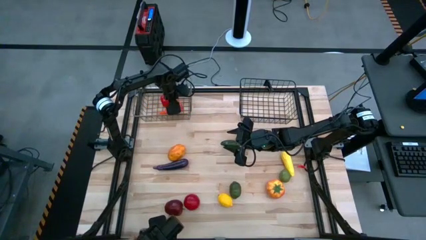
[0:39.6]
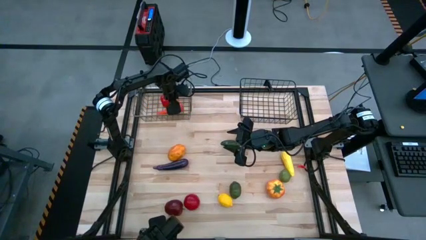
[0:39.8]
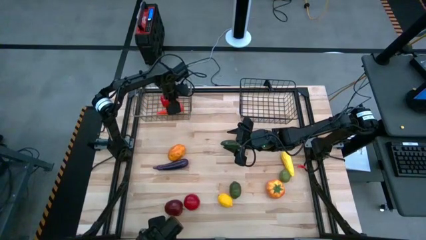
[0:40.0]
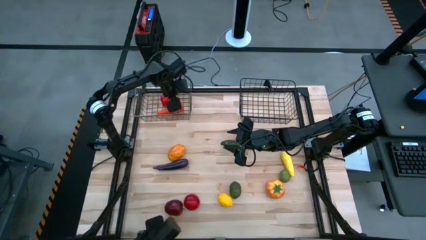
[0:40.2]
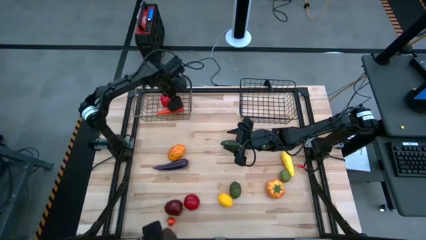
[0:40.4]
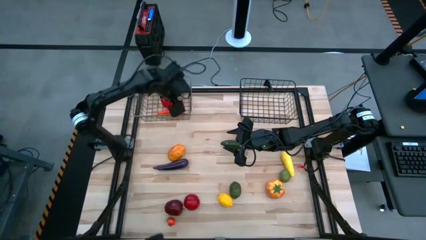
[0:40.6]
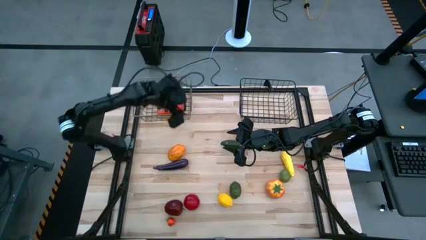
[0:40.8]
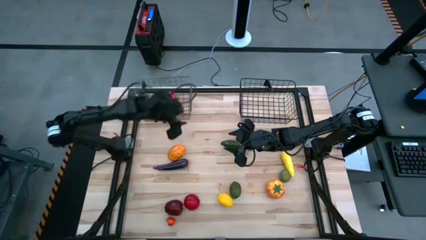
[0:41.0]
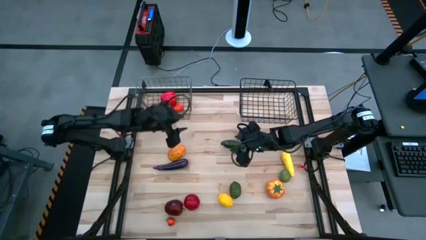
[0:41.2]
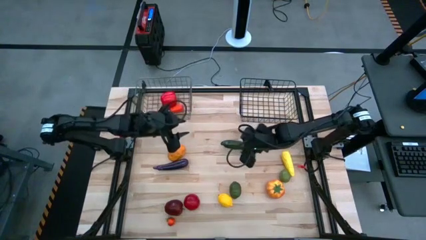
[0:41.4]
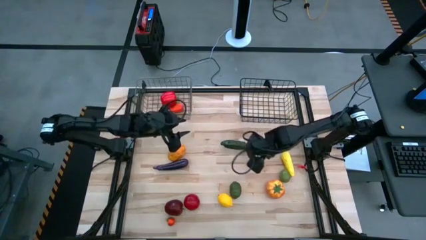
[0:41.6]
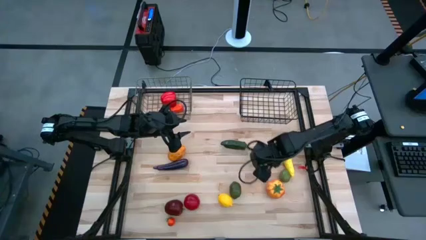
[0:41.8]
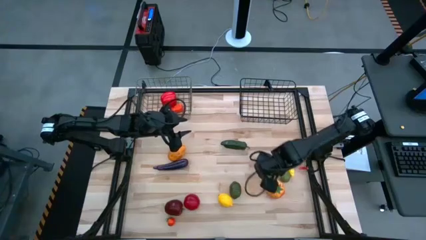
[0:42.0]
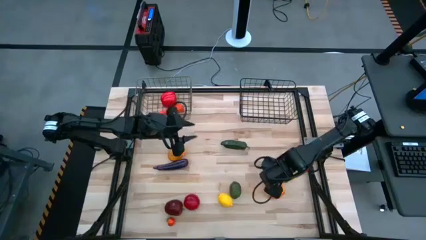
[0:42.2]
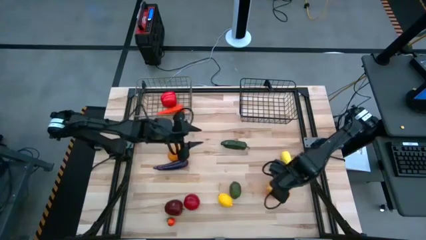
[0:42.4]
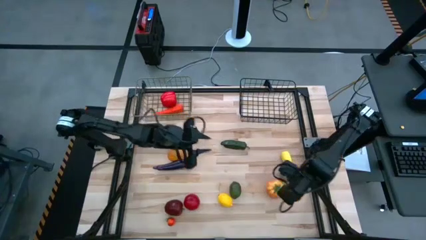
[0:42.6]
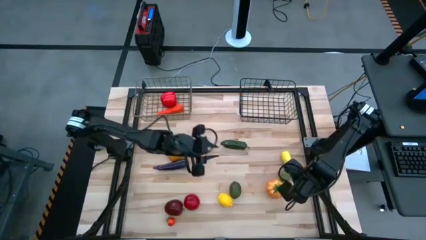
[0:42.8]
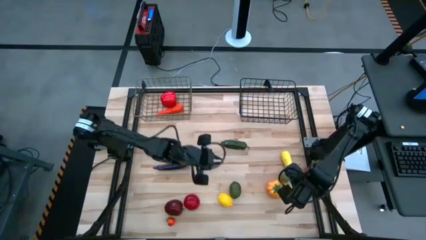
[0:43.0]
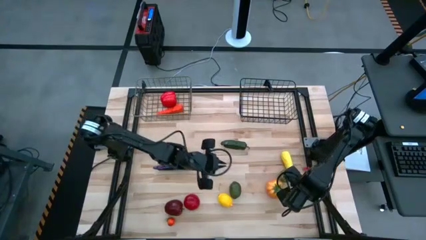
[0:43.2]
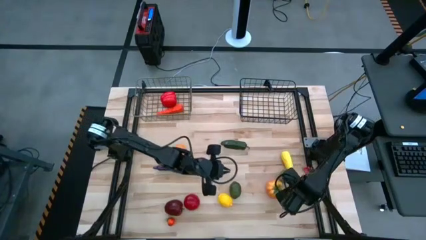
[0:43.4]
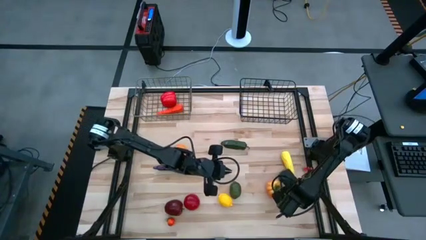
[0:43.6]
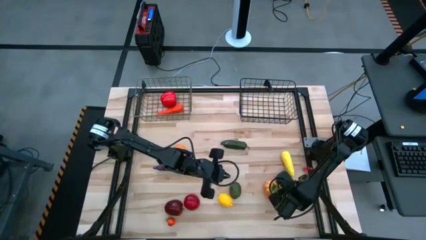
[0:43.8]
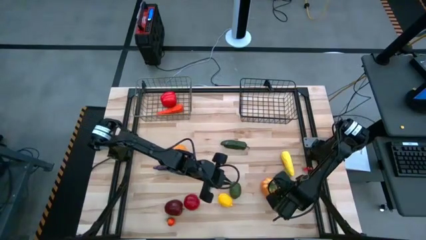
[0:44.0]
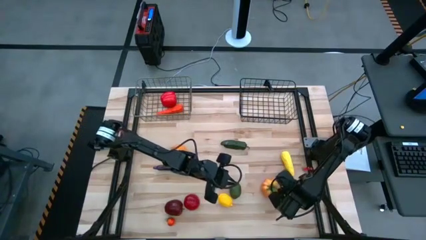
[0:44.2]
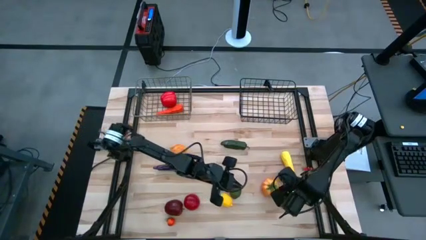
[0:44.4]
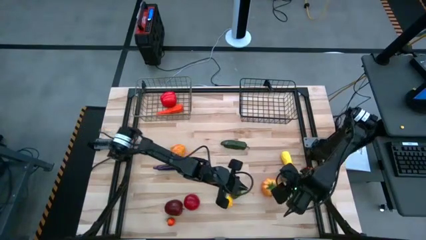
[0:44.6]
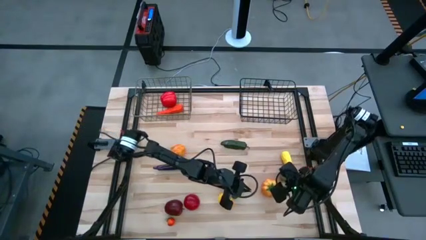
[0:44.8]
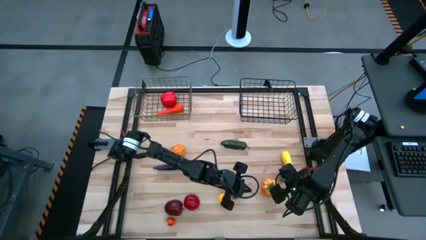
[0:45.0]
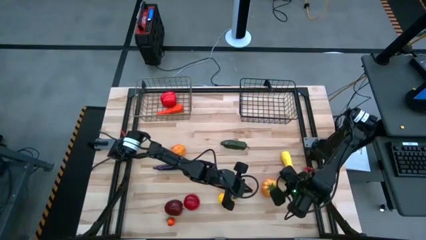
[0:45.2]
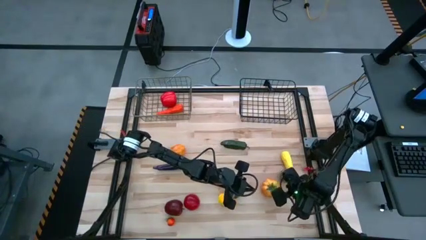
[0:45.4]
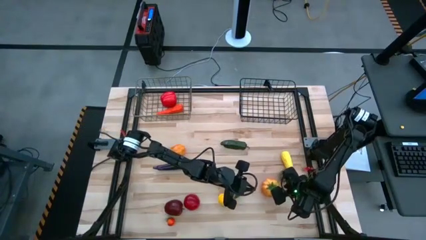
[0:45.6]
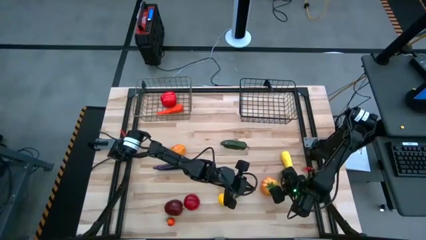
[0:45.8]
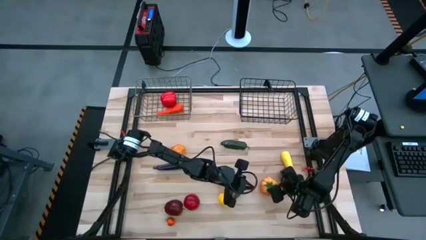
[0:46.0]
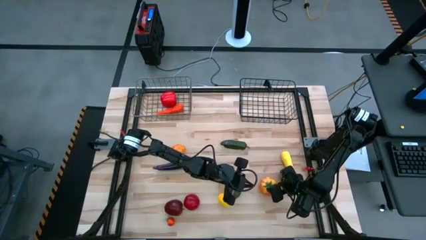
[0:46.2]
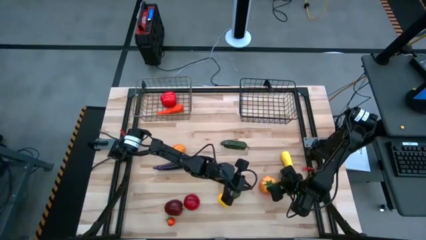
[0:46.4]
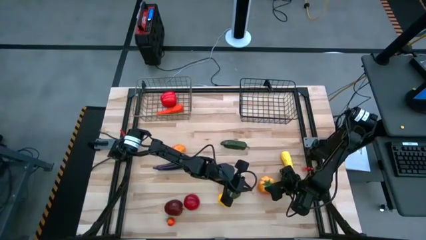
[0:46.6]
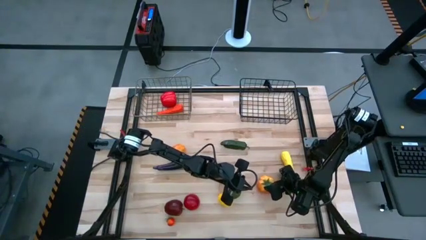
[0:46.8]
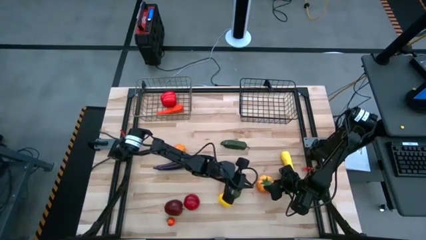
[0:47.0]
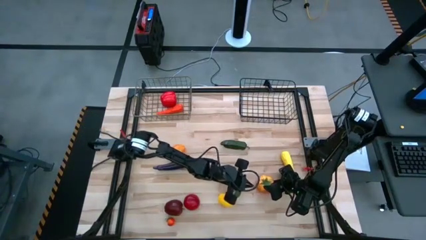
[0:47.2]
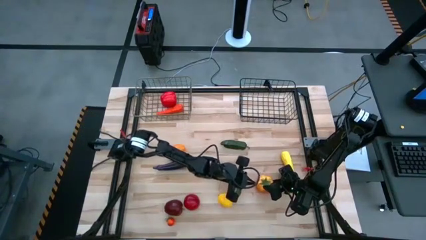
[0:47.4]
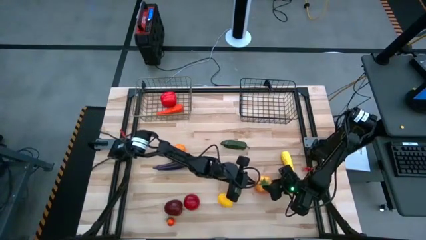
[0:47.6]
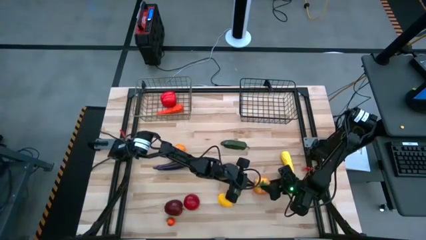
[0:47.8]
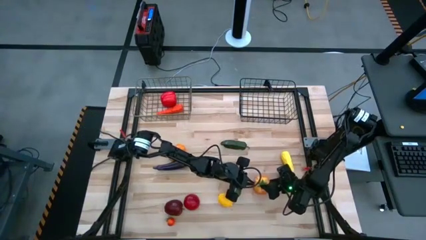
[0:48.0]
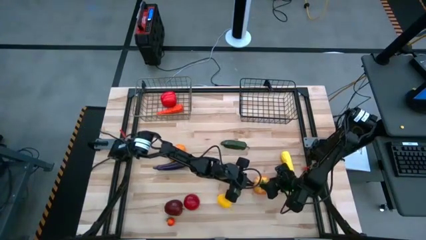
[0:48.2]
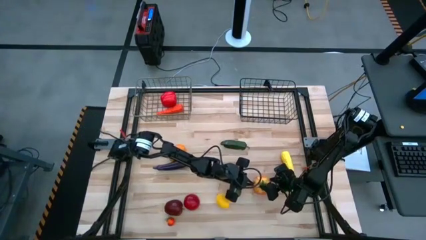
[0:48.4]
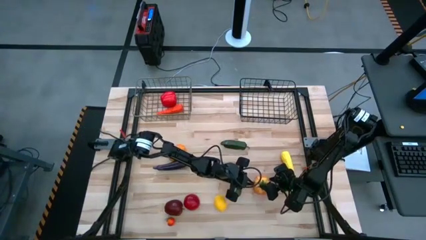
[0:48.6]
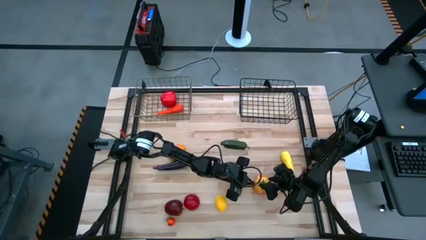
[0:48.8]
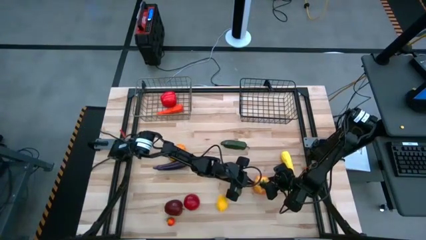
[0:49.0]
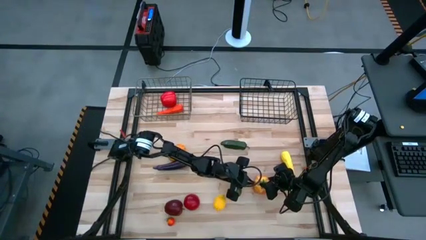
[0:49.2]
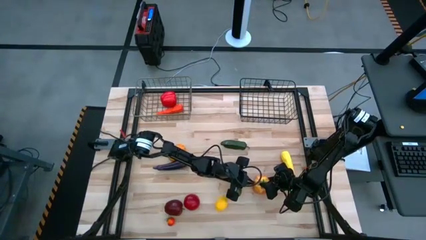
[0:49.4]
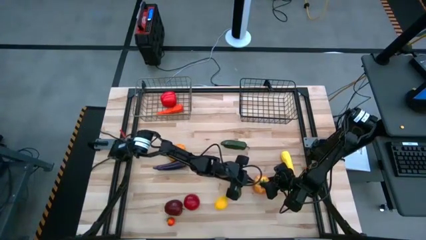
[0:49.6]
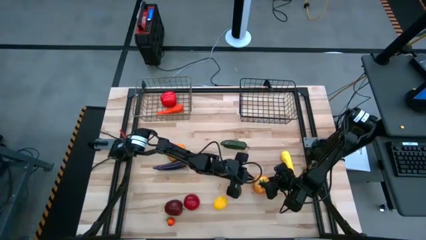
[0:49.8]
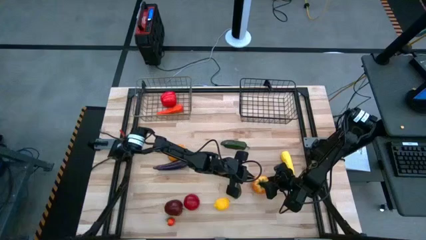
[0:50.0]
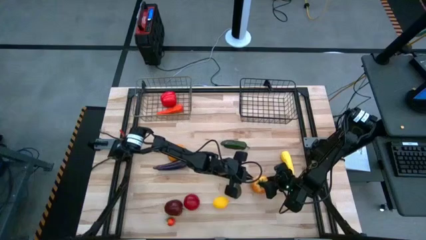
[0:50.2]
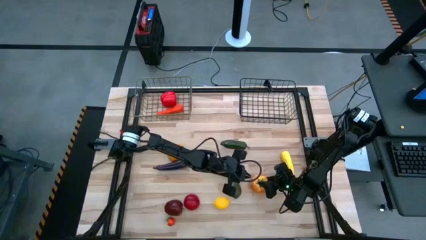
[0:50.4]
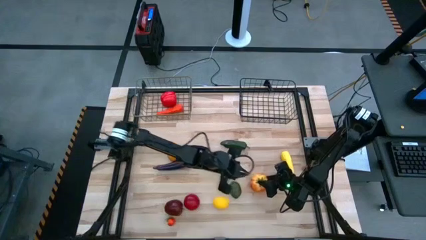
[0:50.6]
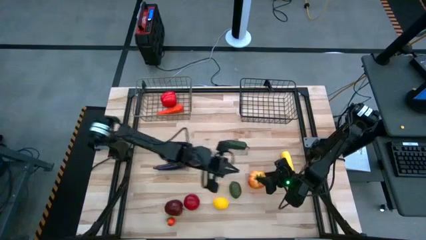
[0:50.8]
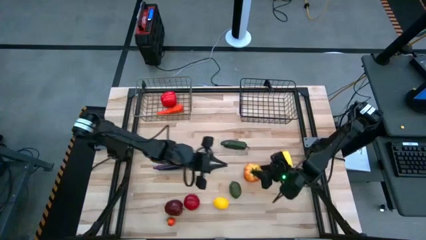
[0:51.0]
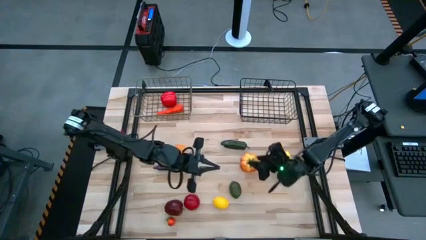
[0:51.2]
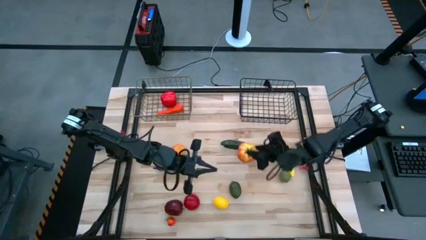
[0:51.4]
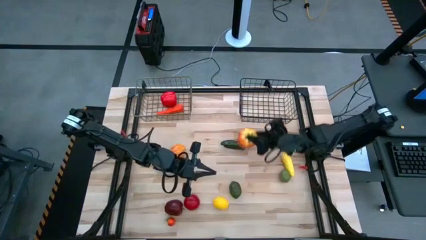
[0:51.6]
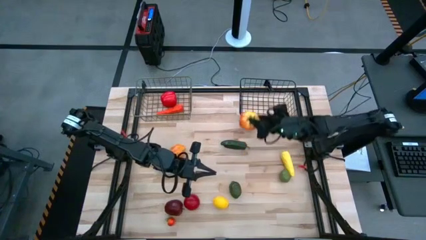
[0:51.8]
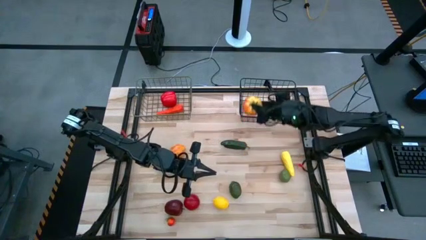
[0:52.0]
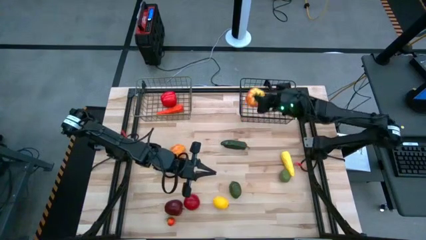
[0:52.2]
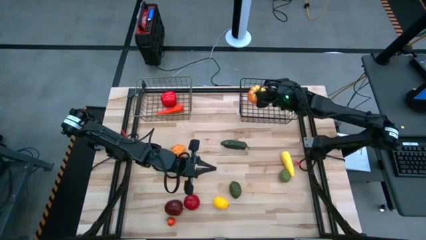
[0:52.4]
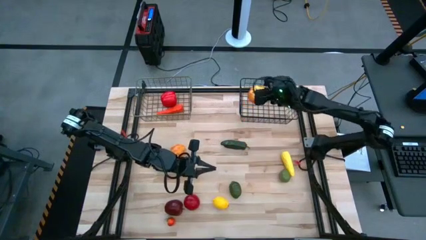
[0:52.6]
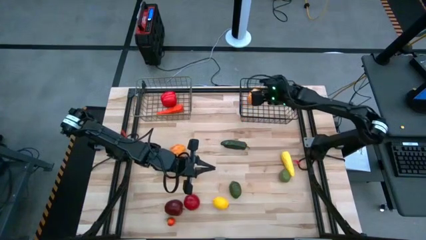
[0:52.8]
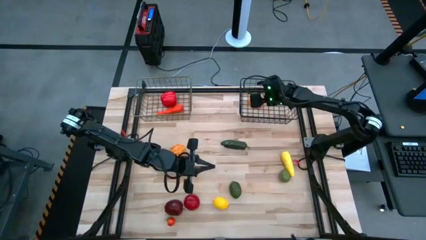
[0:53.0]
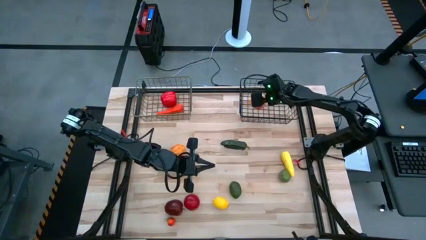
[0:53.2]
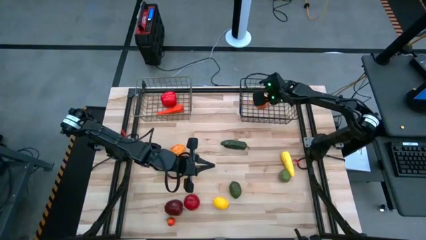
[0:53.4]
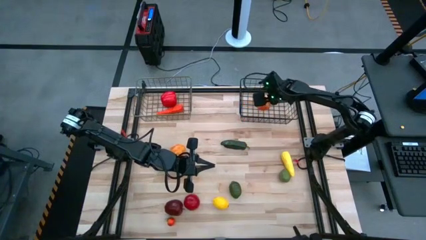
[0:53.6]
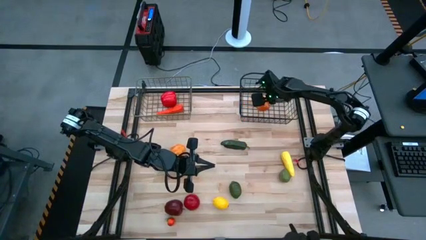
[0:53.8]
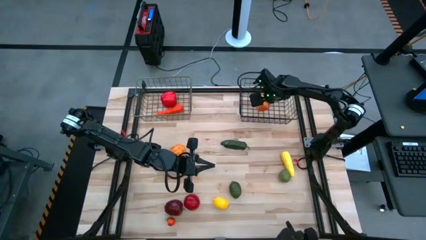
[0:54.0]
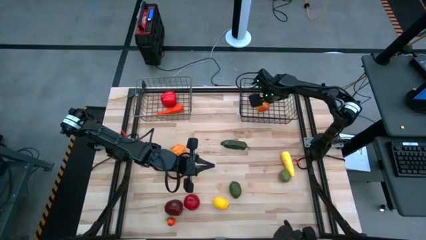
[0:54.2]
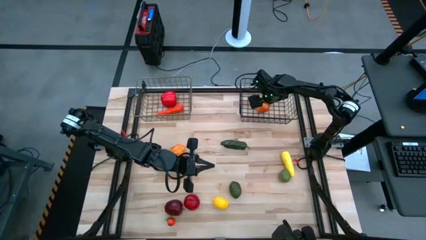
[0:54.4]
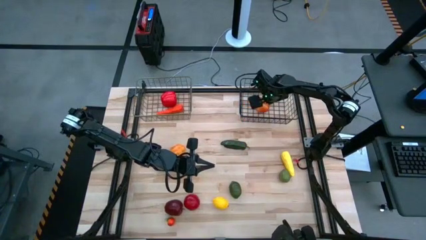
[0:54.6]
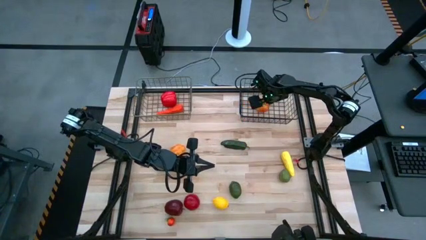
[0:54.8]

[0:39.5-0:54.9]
Task: Sort produce into baskets
Put the large tomato into the black wire basket
